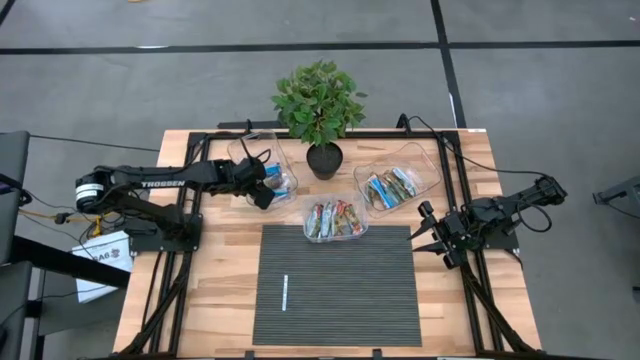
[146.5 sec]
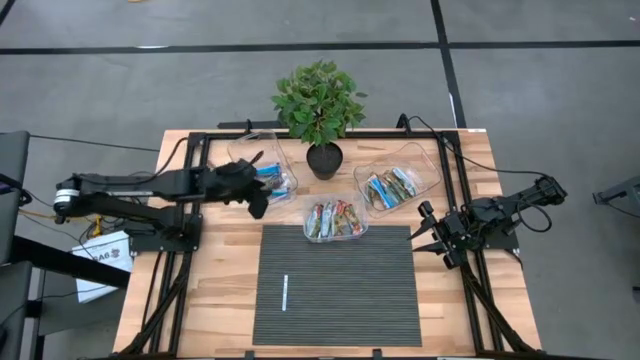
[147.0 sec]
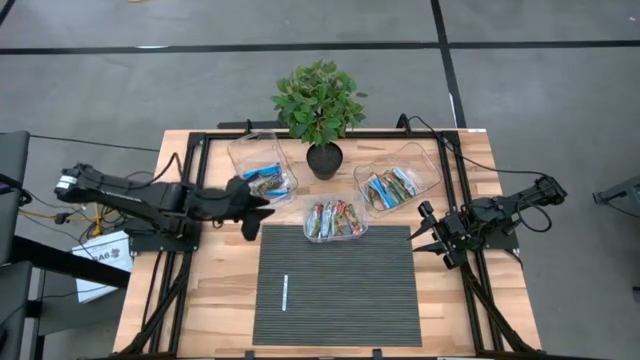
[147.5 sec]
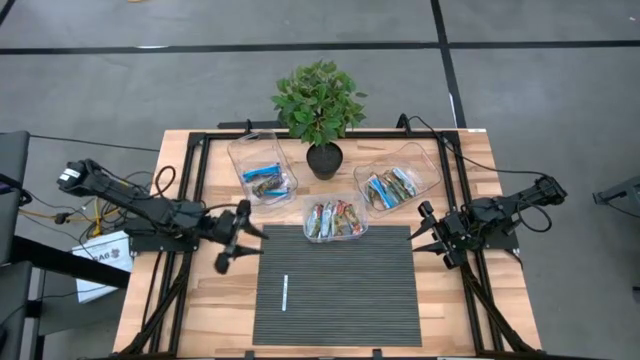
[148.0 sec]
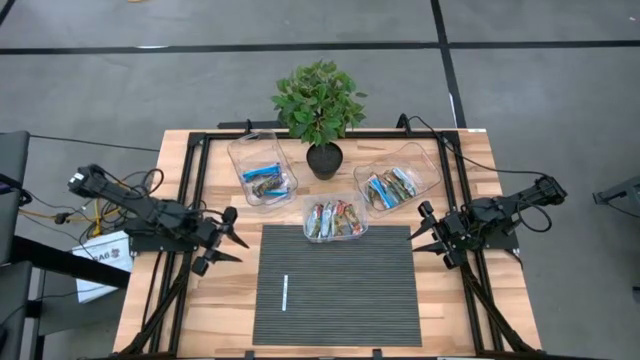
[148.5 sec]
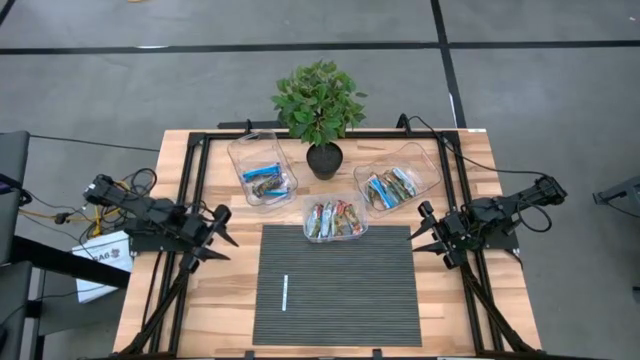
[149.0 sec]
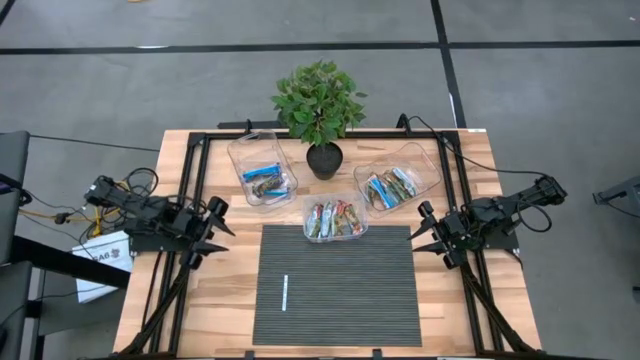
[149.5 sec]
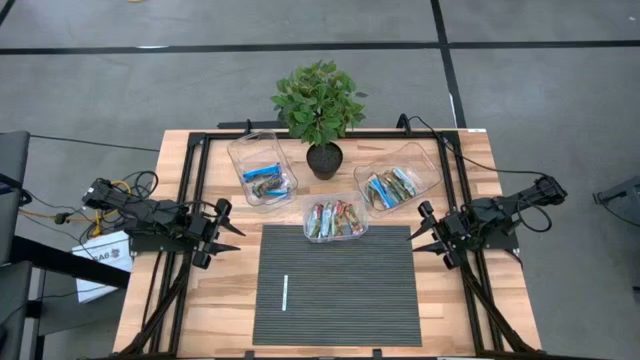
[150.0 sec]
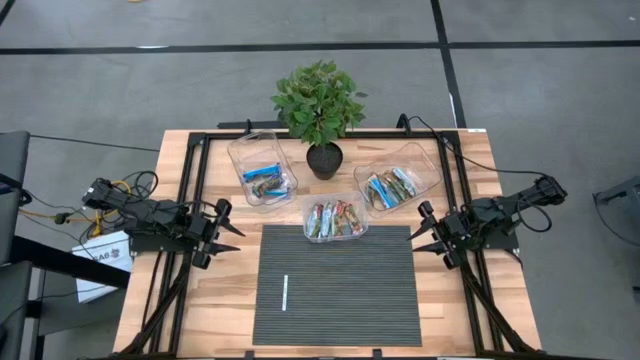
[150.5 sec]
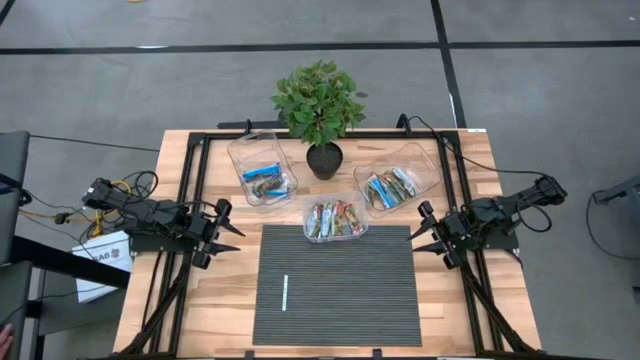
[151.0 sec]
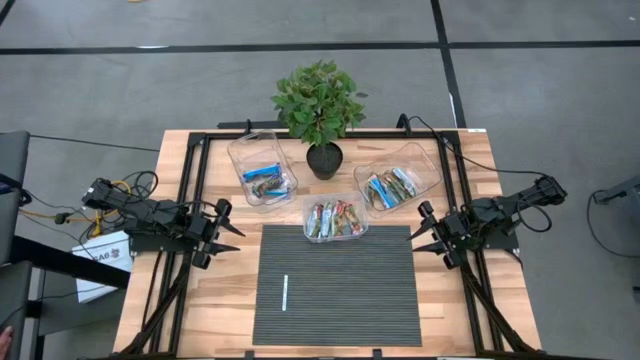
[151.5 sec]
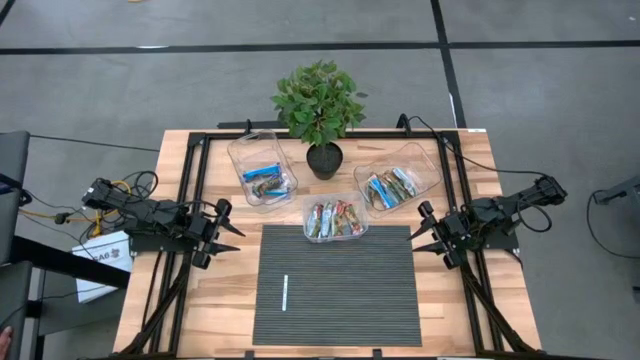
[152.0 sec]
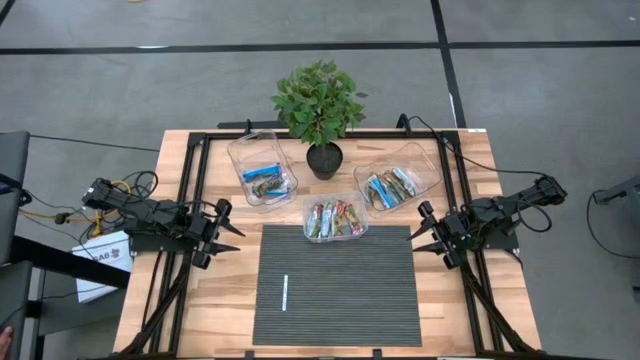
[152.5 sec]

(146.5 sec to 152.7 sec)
Task: Pick and place Granola Bars by type
Return to Home Position

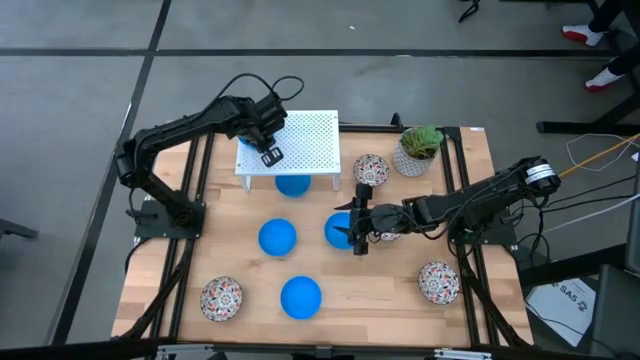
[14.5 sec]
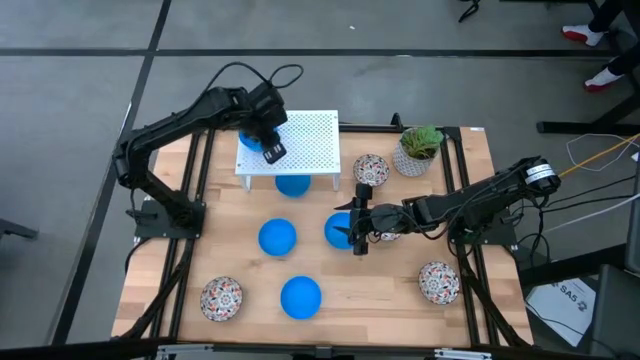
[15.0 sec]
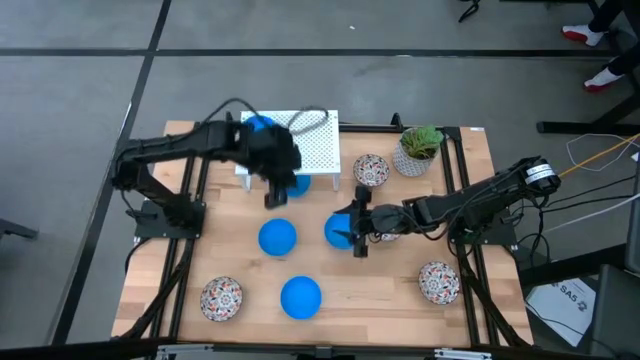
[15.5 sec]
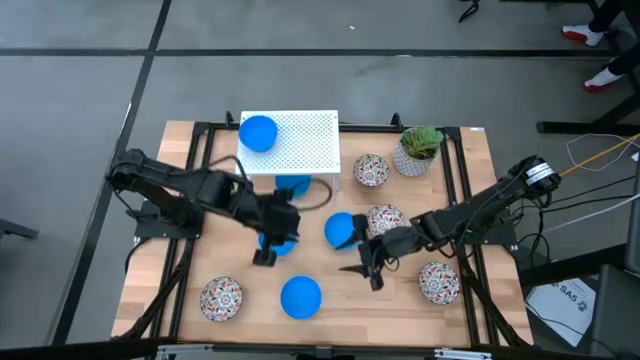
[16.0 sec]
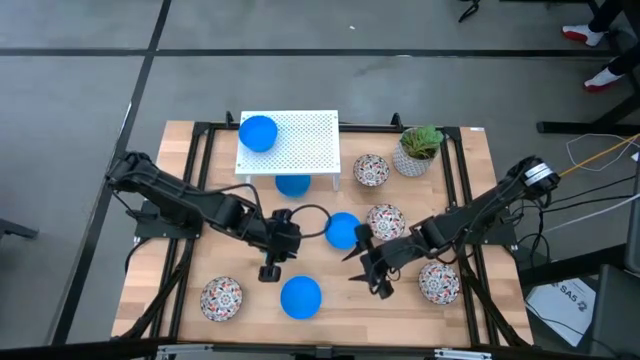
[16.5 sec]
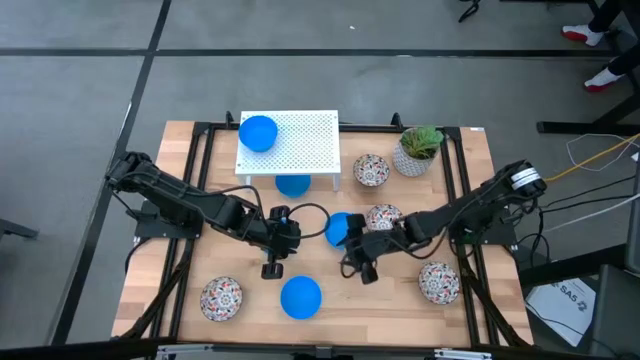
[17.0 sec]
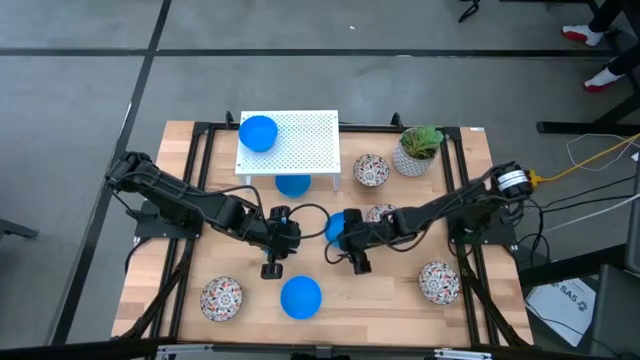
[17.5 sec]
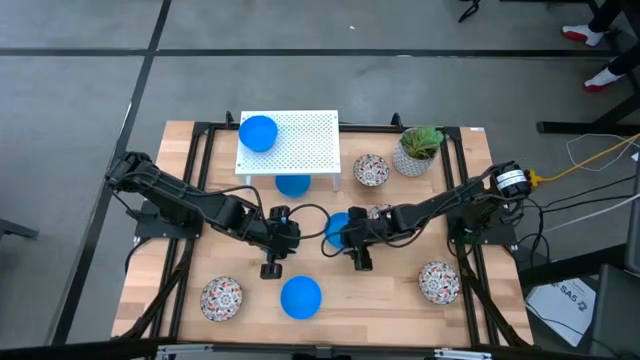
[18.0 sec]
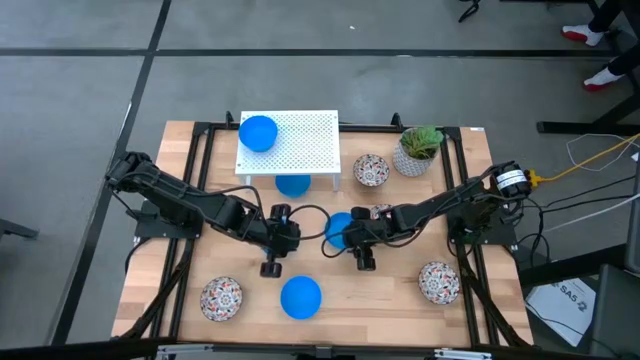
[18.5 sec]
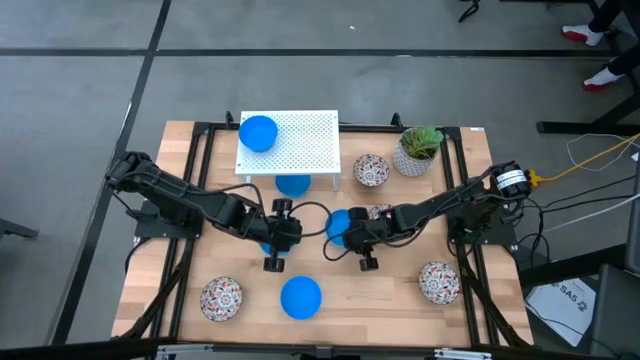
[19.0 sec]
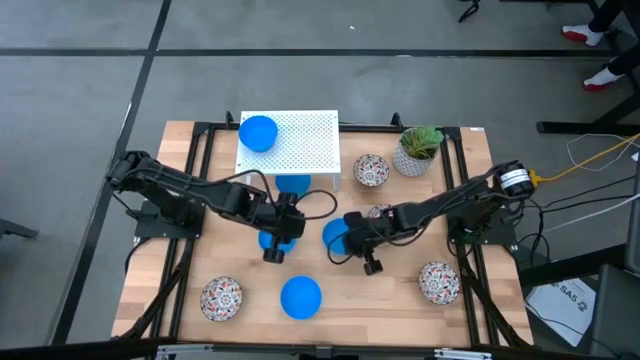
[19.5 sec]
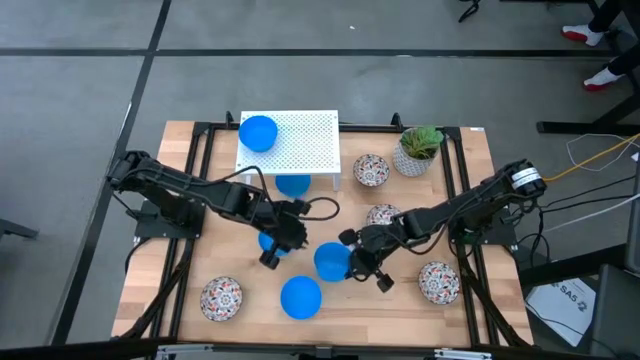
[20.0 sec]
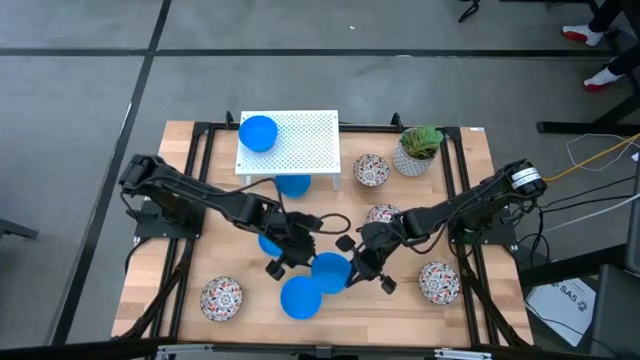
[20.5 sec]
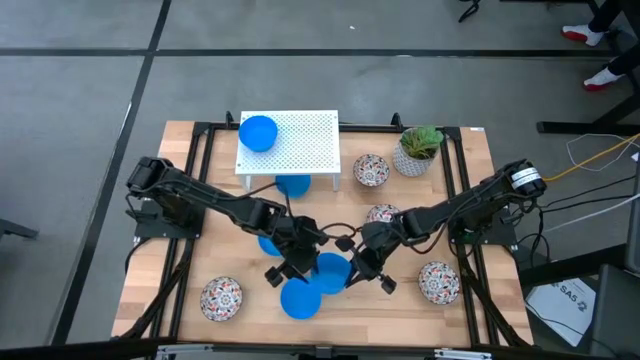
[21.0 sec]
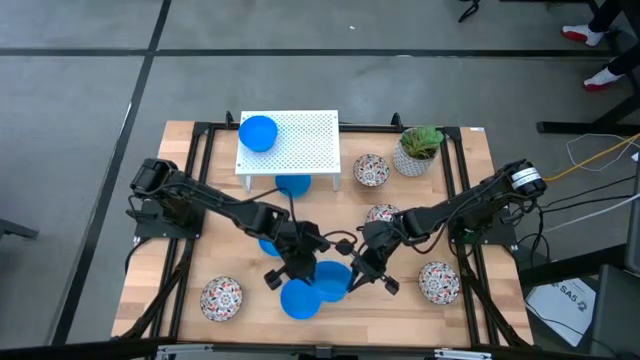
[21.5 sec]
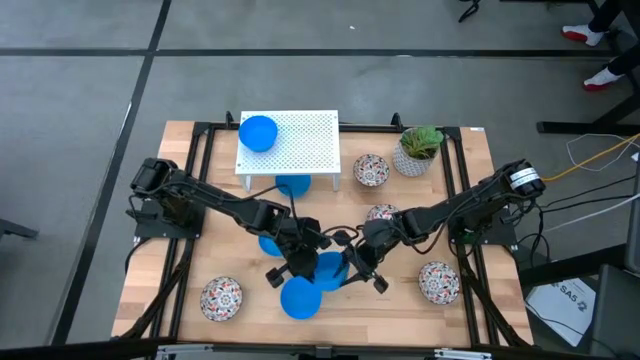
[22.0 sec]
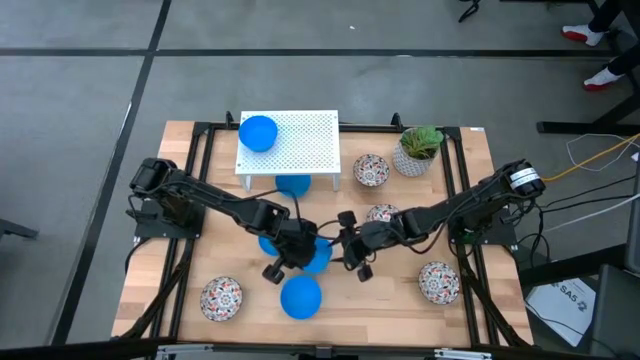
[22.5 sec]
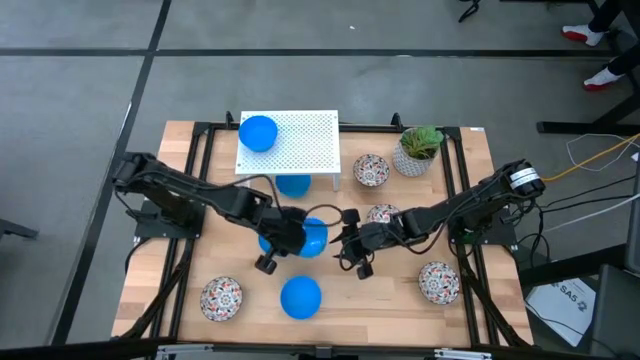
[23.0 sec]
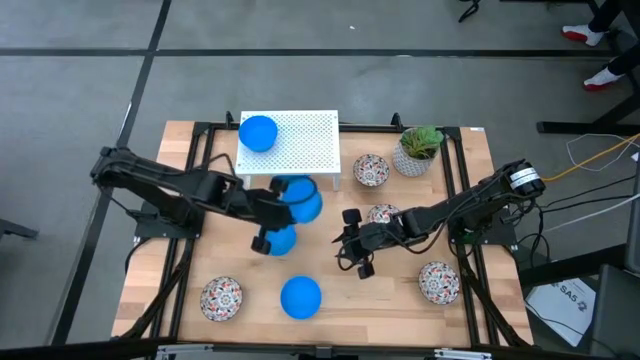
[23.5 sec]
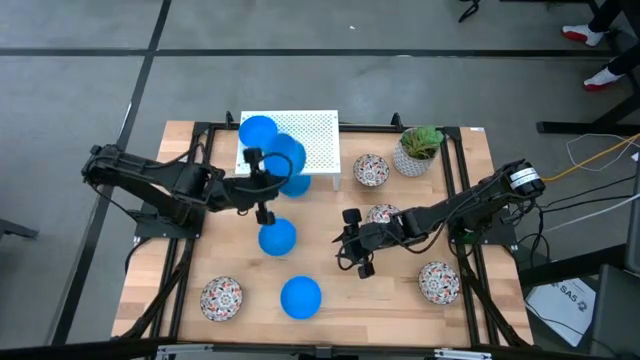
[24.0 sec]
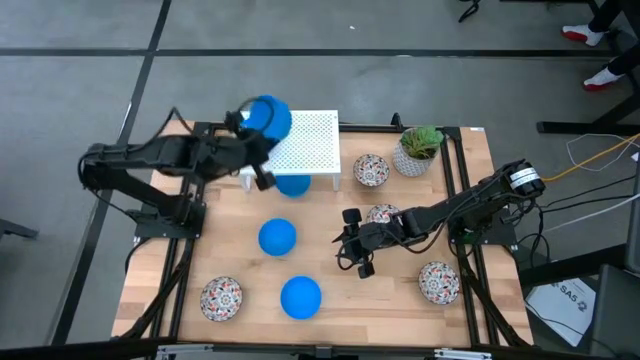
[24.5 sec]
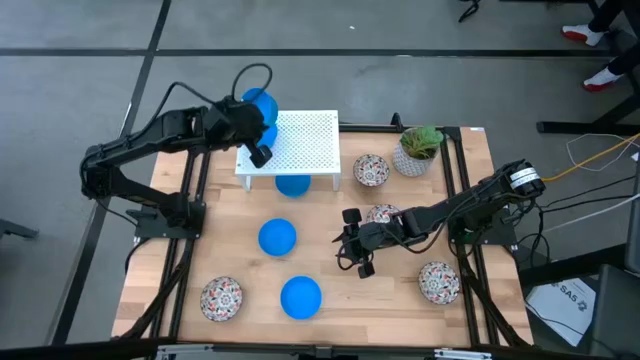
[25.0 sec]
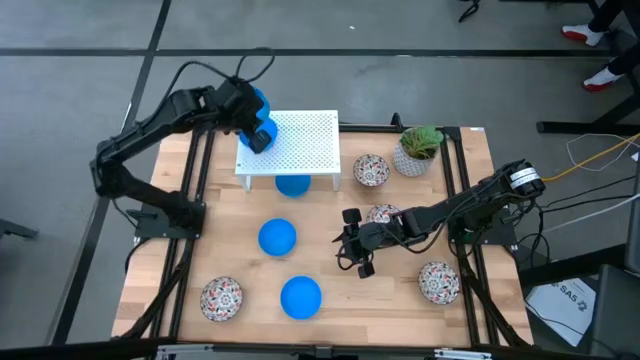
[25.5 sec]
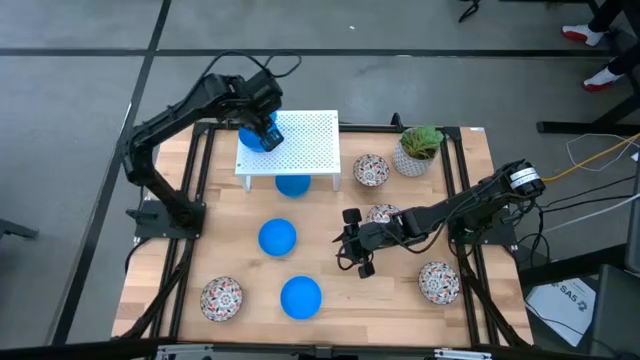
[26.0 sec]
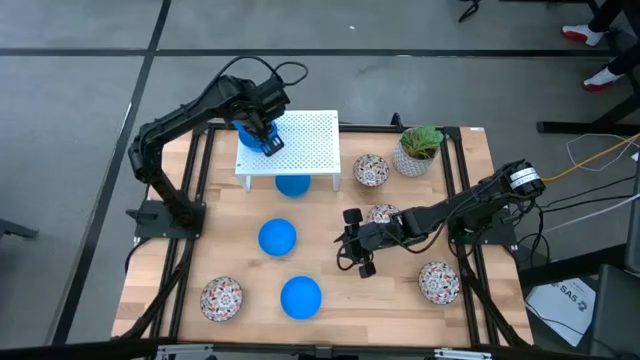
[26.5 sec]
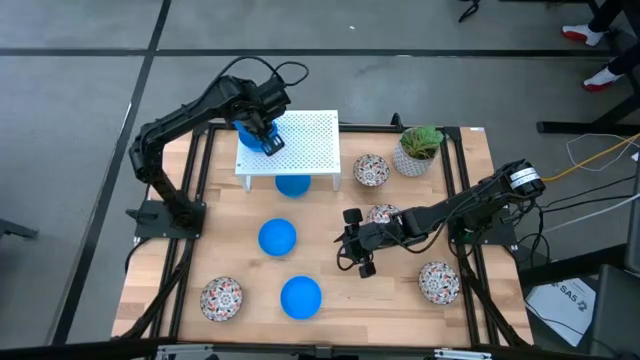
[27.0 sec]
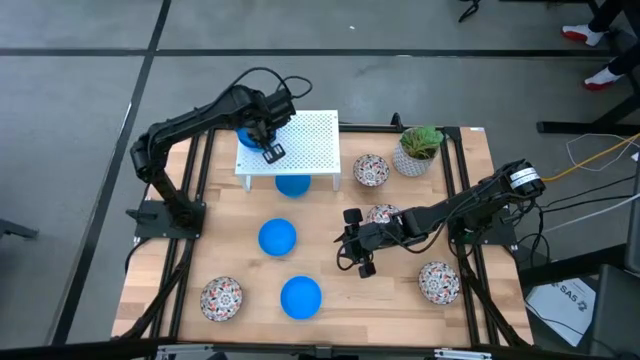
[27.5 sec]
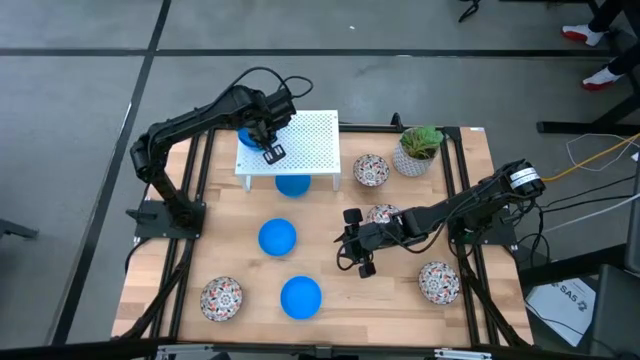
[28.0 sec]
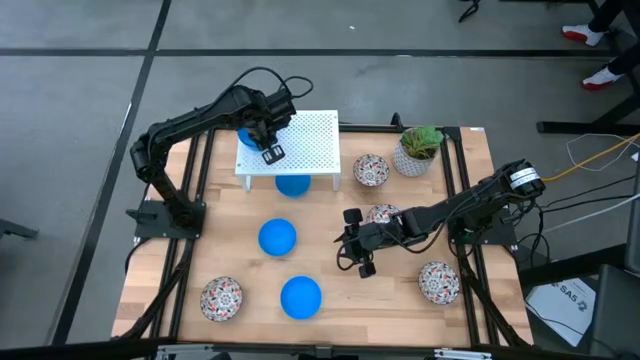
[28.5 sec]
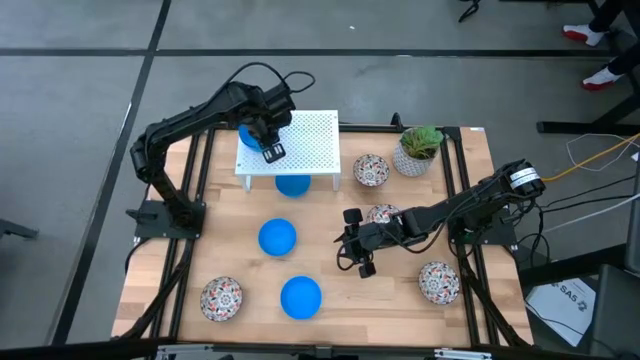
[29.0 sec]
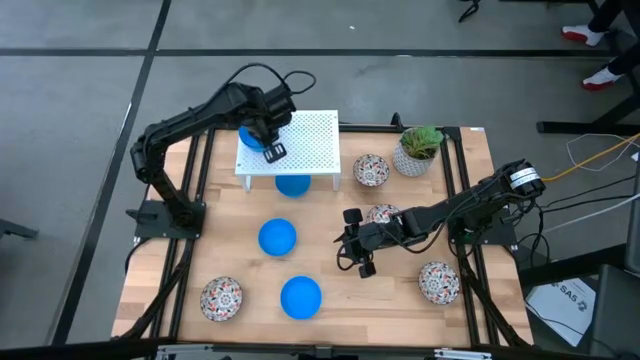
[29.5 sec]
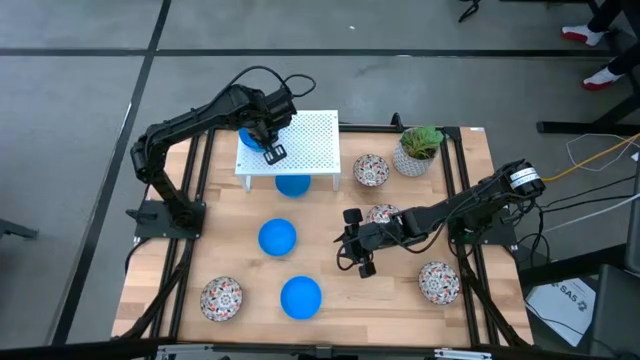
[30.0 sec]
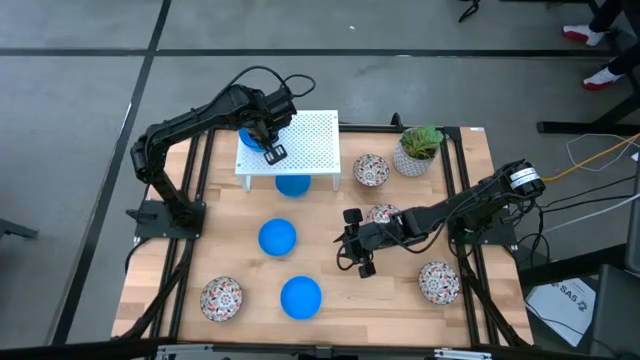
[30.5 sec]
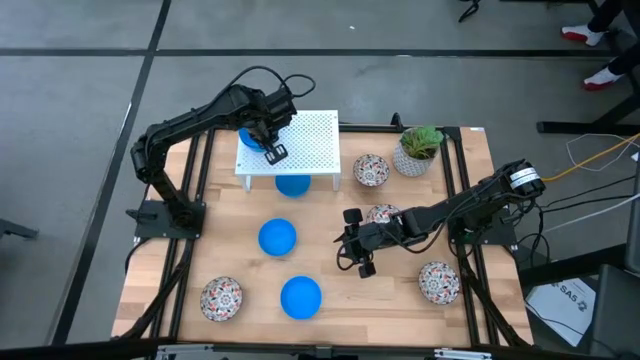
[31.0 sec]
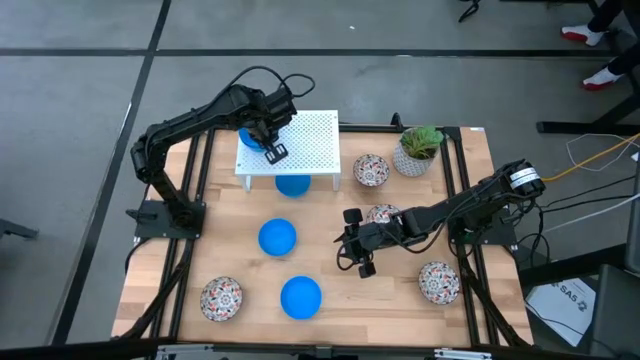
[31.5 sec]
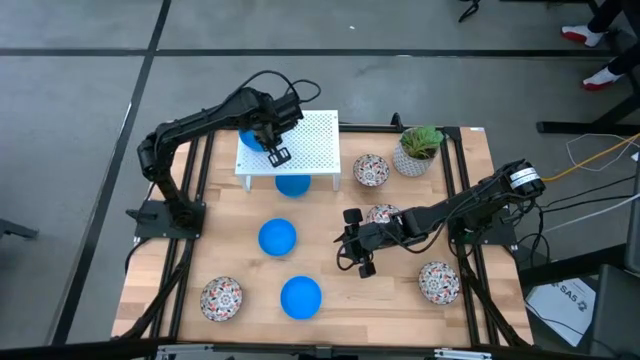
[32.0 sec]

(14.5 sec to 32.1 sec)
Task: Pick & Place Mini bowls
Stack the blue bowl on the blue bowl on the shelf
